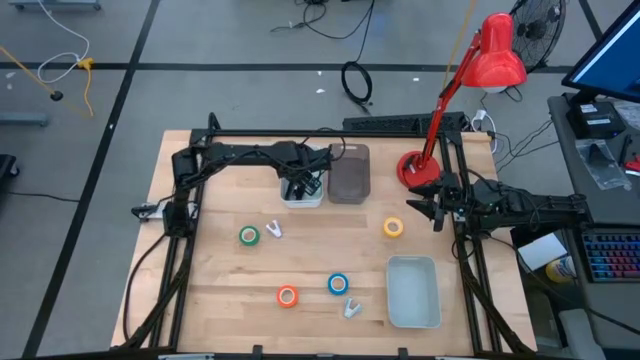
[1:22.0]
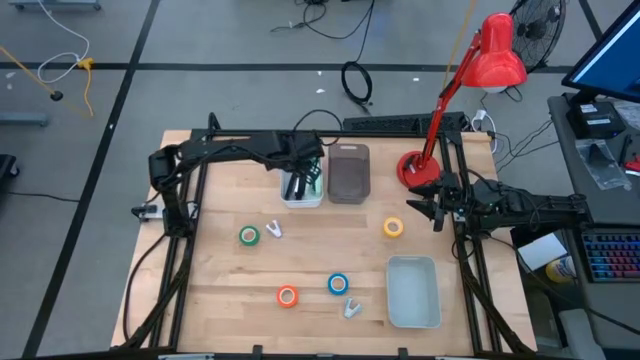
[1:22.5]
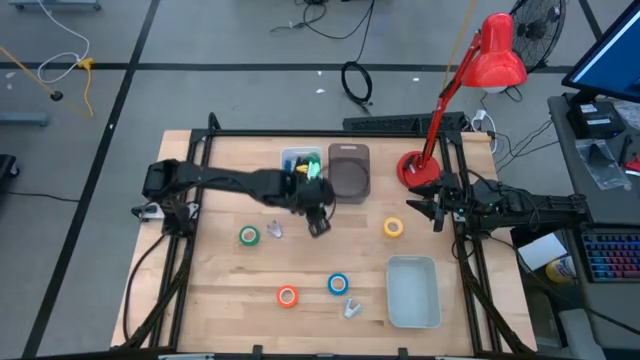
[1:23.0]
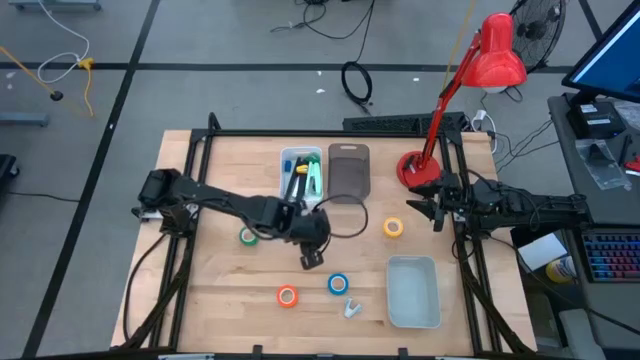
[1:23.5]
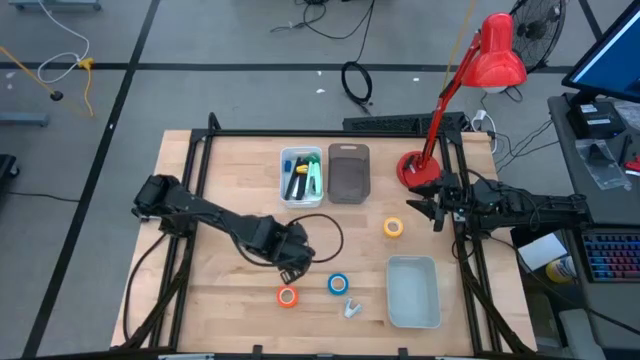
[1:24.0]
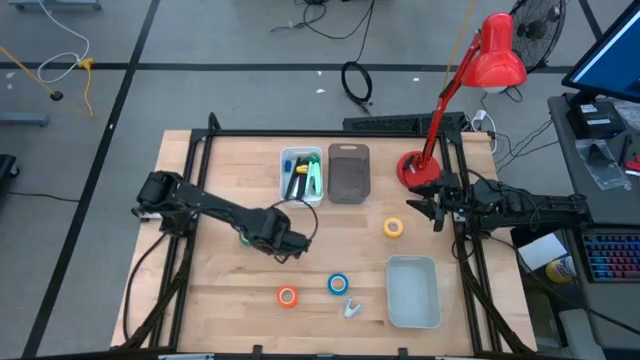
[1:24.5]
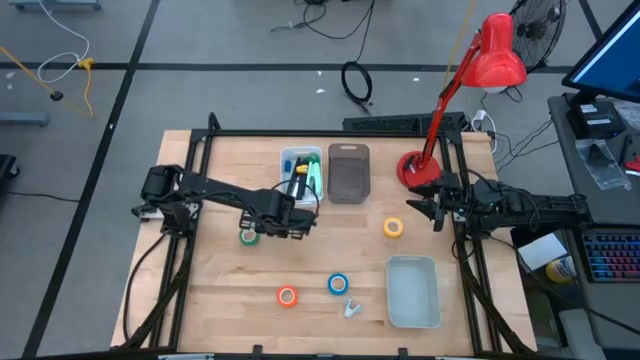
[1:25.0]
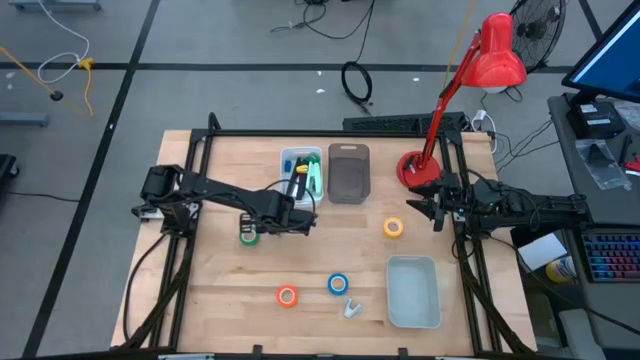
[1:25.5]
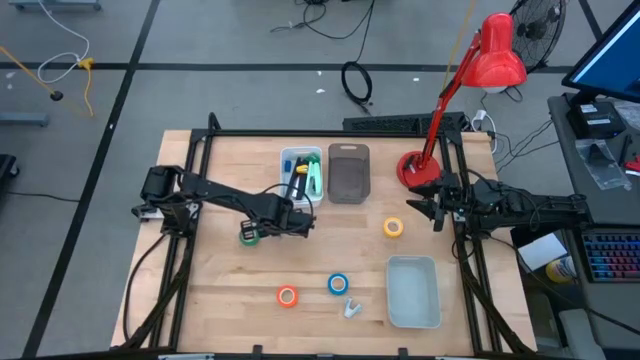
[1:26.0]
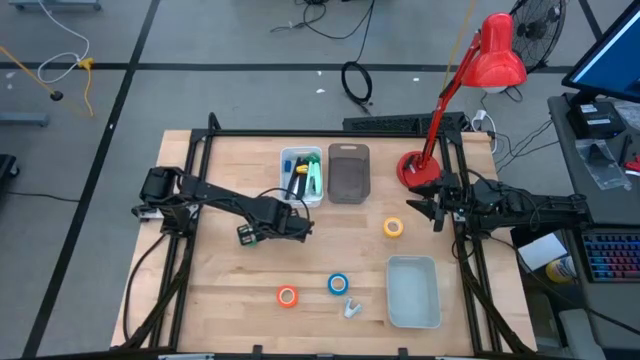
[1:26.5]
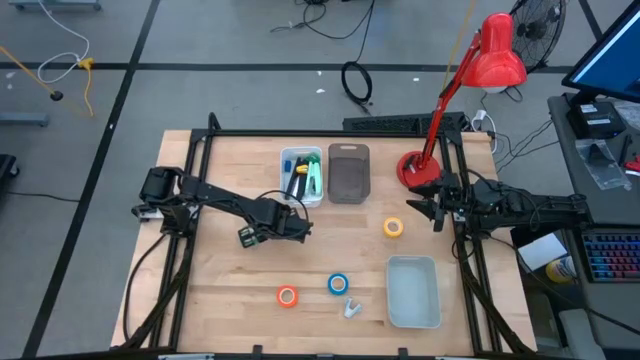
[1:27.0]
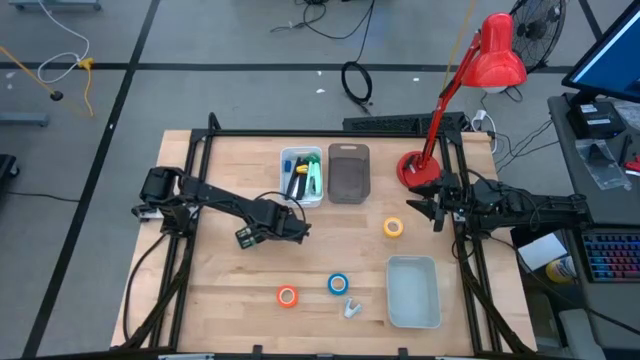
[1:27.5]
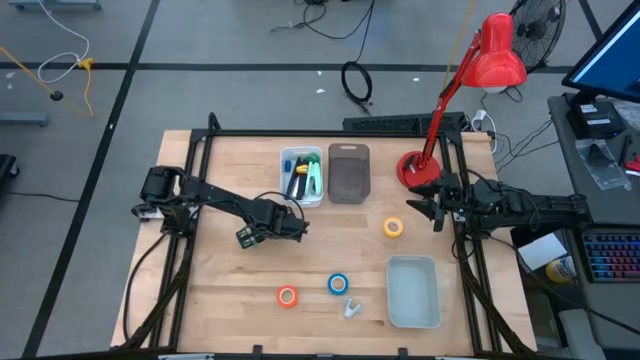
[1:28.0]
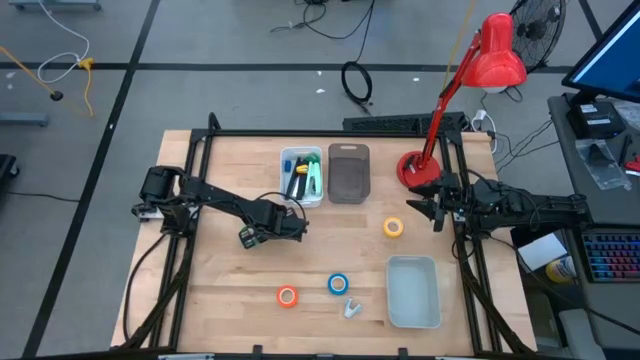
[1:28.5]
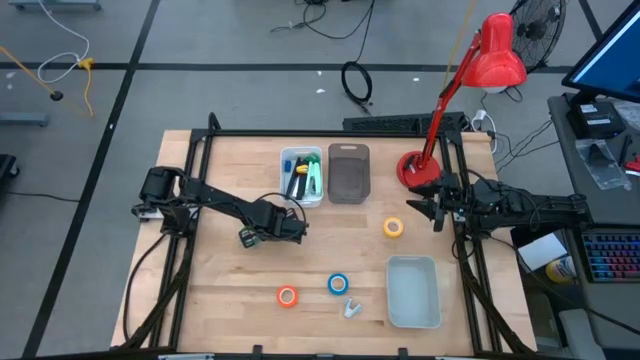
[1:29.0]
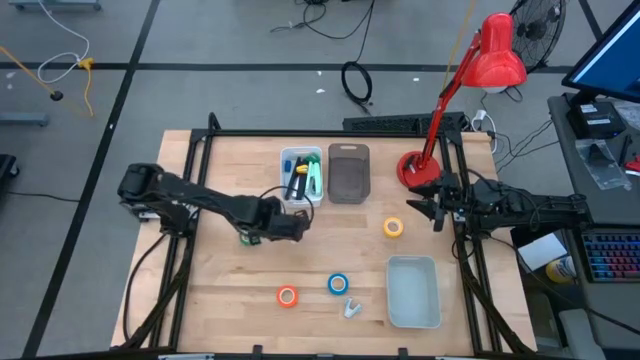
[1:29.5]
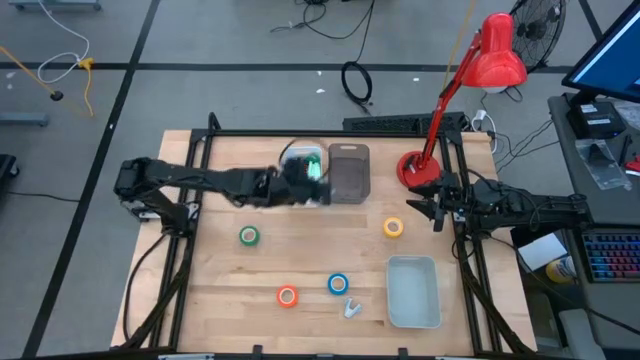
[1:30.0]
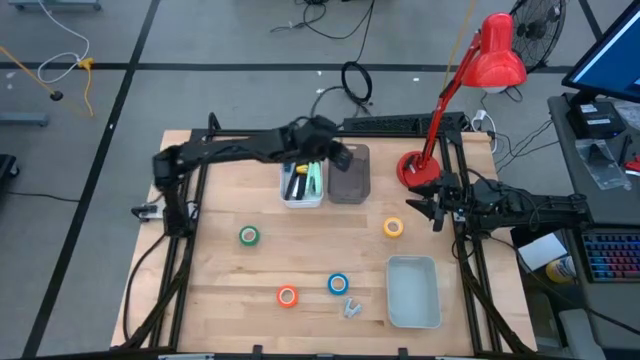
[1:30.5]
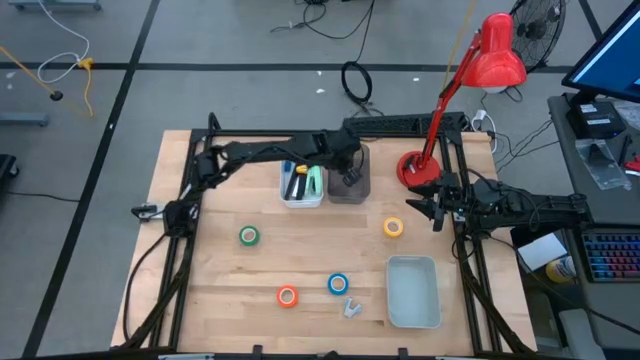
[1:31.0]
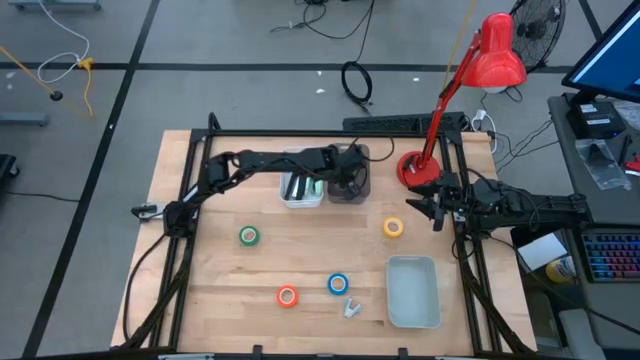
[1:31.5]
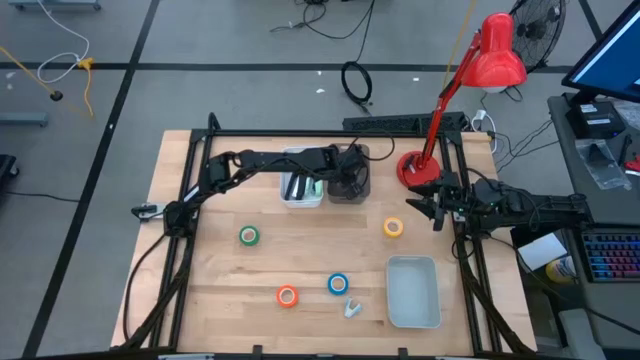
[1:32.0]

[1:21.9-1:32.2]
Task: Pick and place Stapler, Stapler remover, tape
Put the purple staple remover into the black bin
